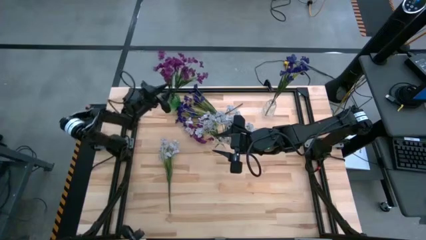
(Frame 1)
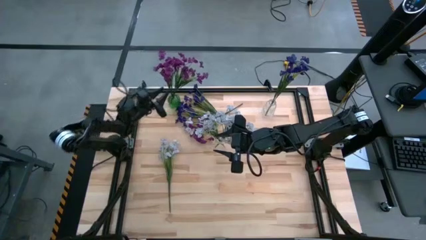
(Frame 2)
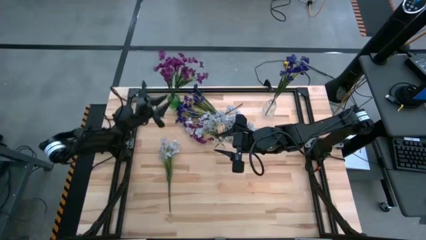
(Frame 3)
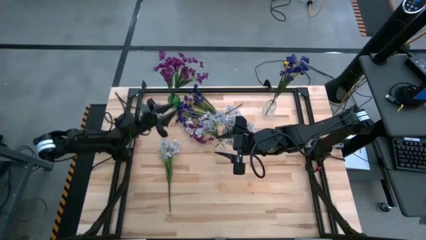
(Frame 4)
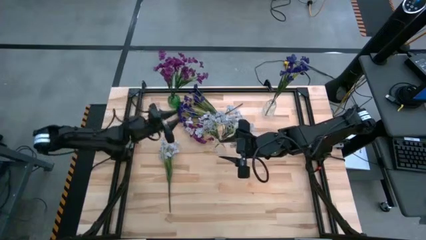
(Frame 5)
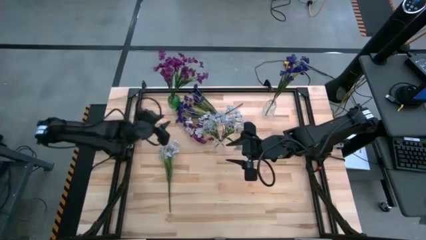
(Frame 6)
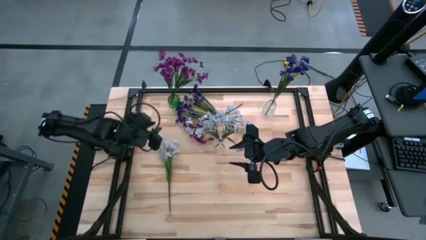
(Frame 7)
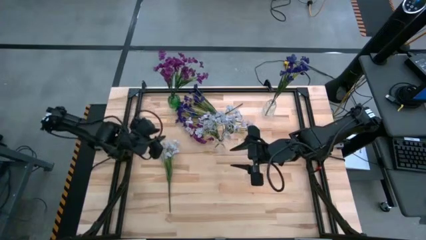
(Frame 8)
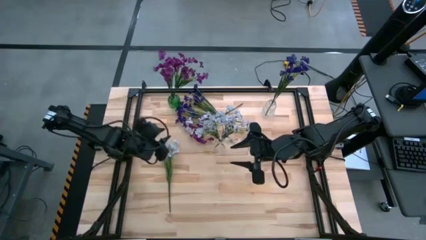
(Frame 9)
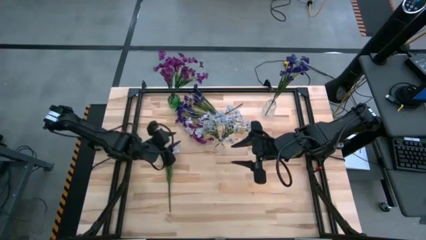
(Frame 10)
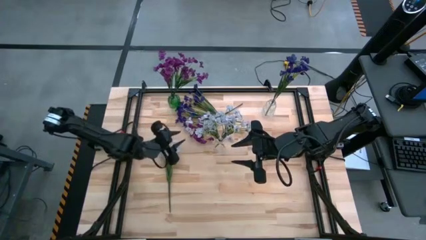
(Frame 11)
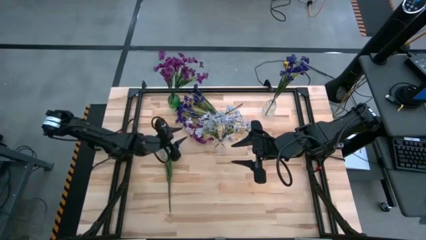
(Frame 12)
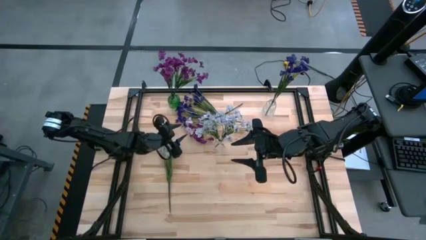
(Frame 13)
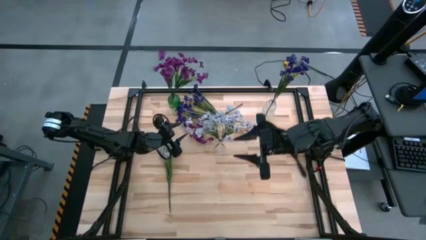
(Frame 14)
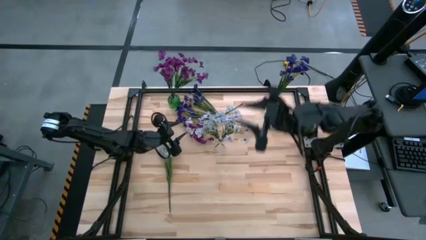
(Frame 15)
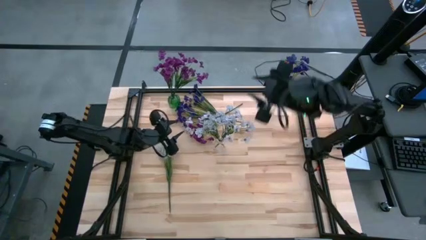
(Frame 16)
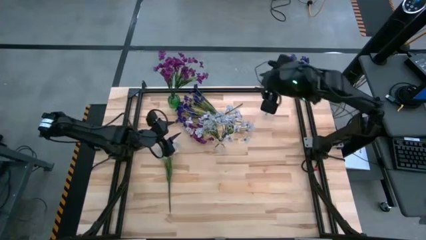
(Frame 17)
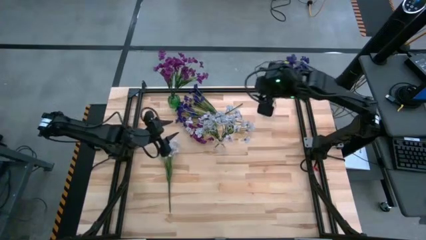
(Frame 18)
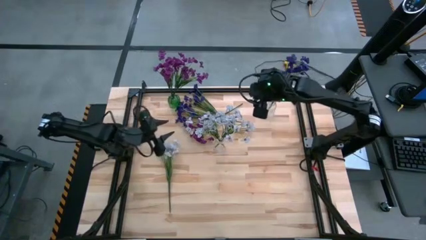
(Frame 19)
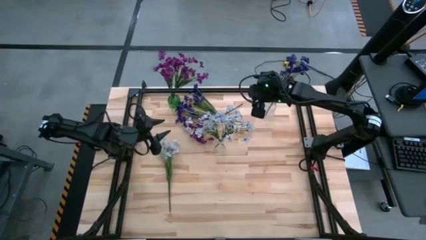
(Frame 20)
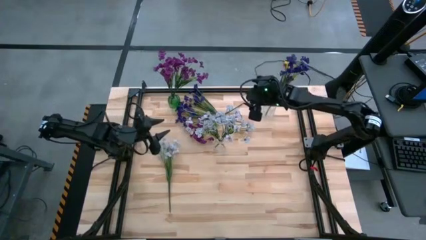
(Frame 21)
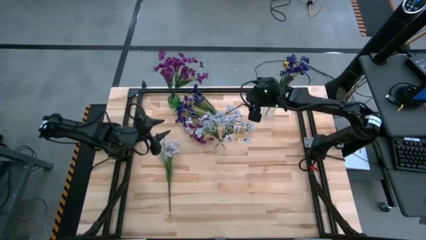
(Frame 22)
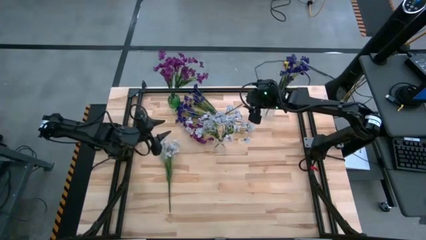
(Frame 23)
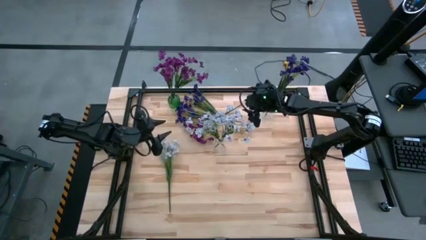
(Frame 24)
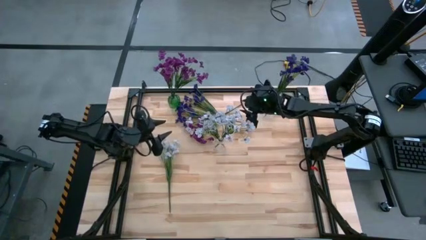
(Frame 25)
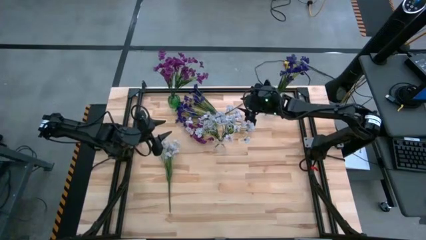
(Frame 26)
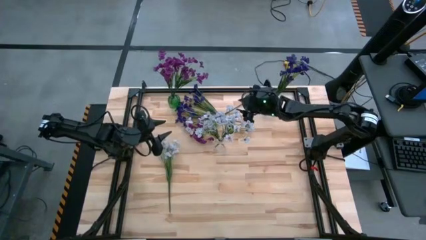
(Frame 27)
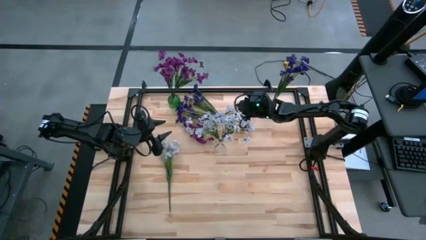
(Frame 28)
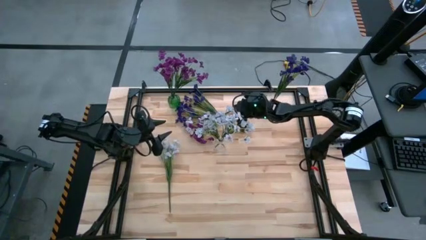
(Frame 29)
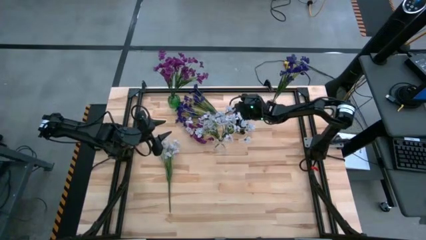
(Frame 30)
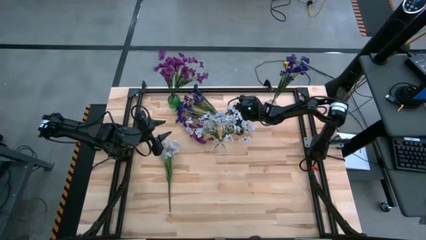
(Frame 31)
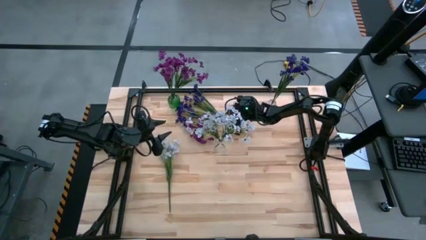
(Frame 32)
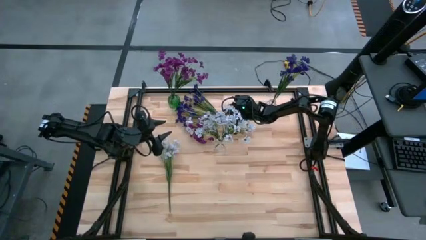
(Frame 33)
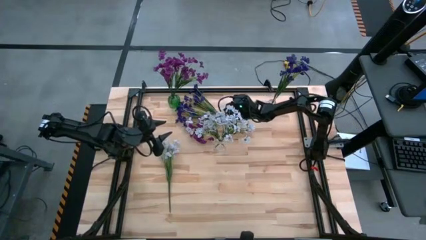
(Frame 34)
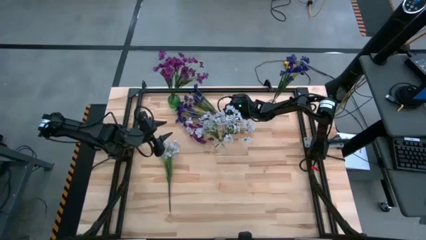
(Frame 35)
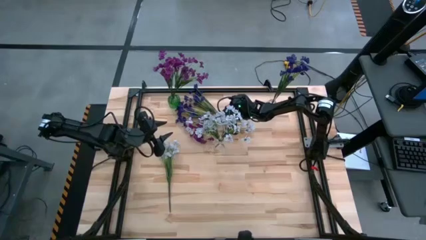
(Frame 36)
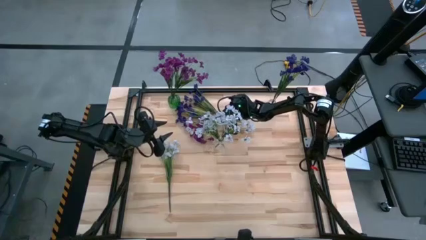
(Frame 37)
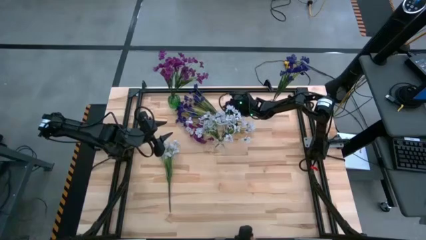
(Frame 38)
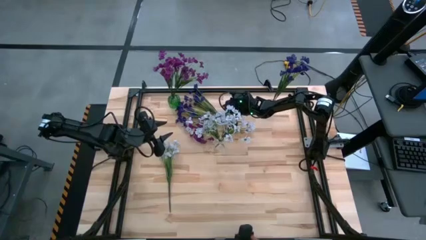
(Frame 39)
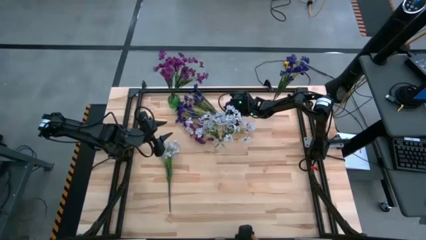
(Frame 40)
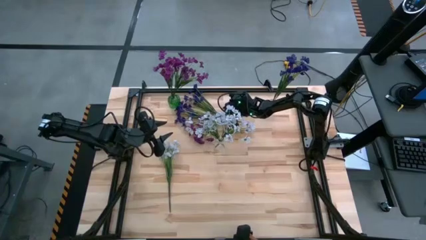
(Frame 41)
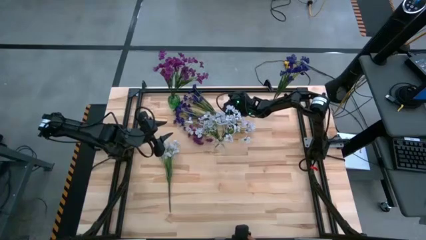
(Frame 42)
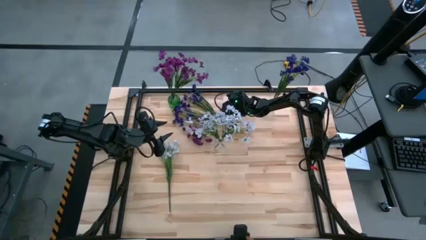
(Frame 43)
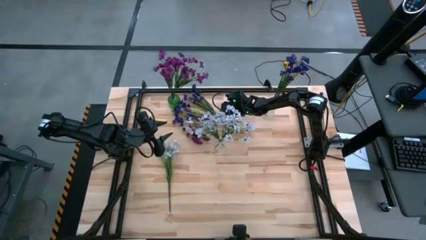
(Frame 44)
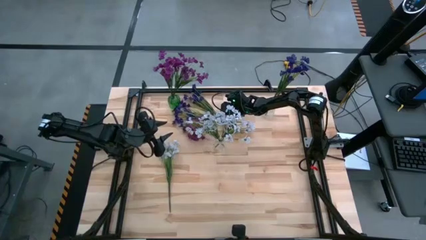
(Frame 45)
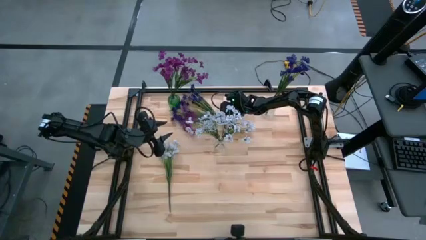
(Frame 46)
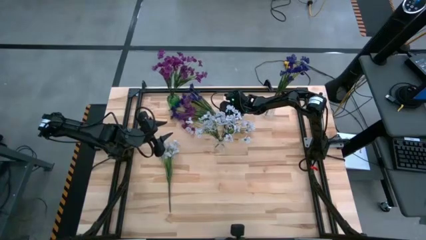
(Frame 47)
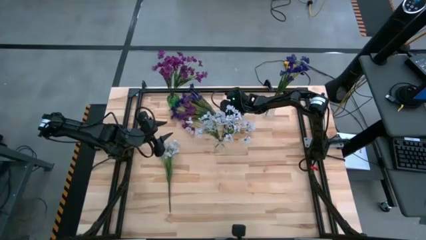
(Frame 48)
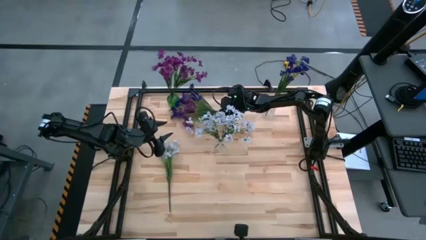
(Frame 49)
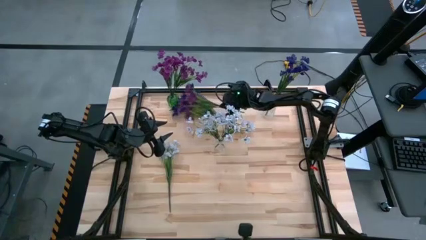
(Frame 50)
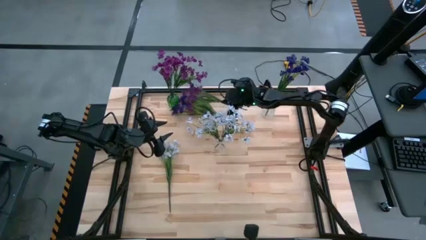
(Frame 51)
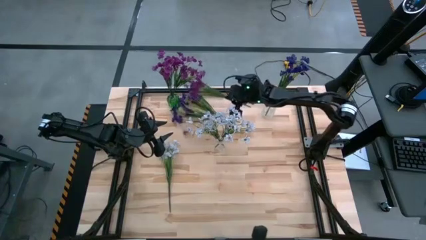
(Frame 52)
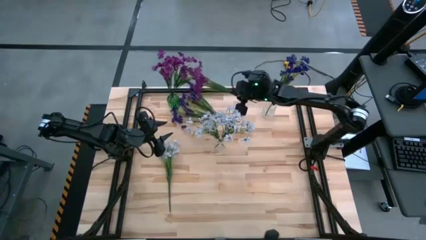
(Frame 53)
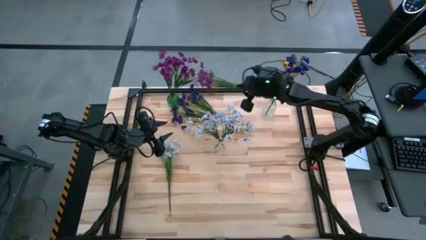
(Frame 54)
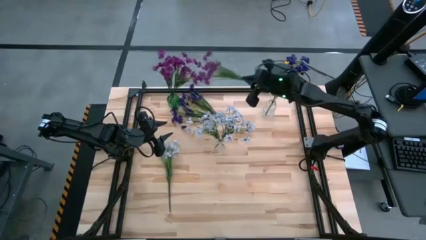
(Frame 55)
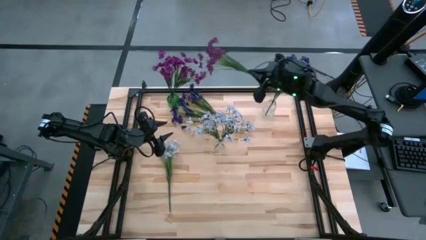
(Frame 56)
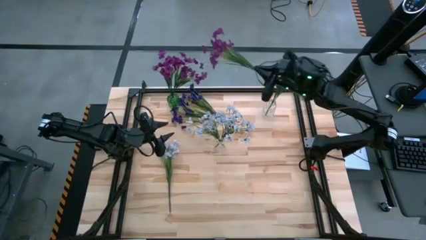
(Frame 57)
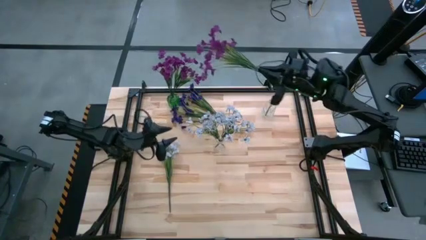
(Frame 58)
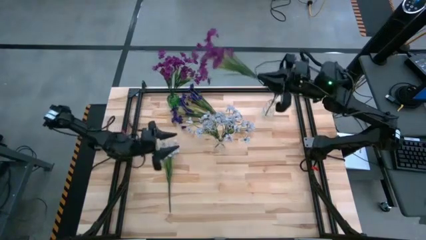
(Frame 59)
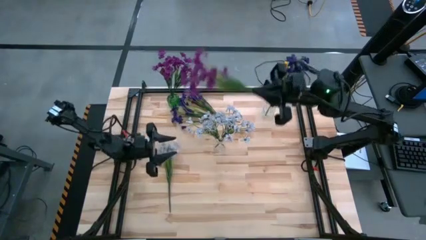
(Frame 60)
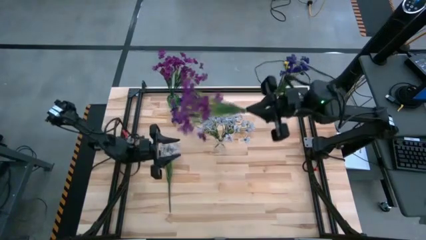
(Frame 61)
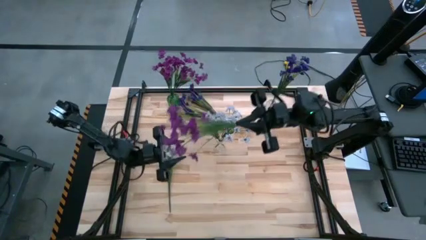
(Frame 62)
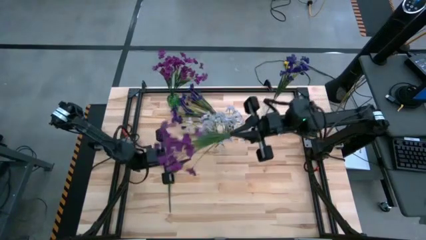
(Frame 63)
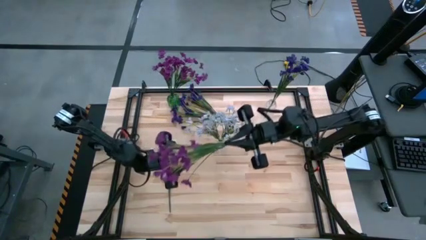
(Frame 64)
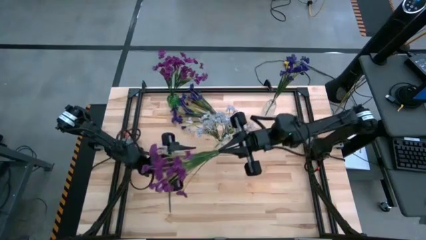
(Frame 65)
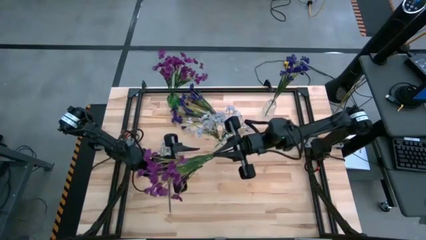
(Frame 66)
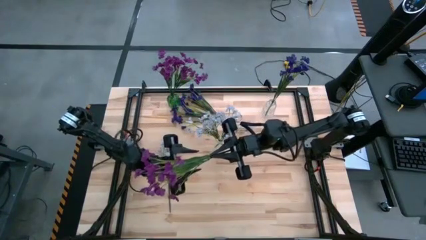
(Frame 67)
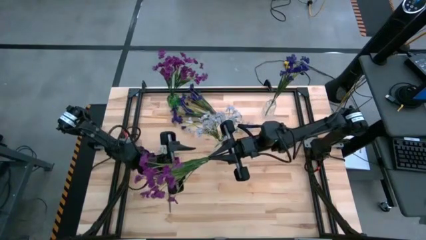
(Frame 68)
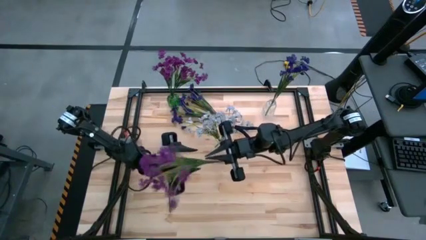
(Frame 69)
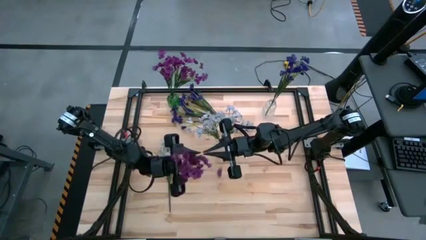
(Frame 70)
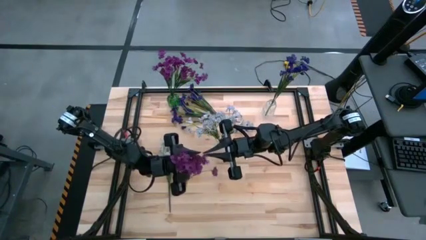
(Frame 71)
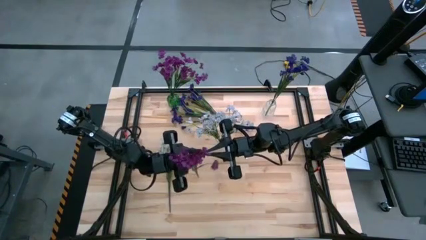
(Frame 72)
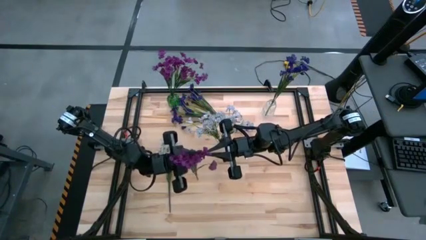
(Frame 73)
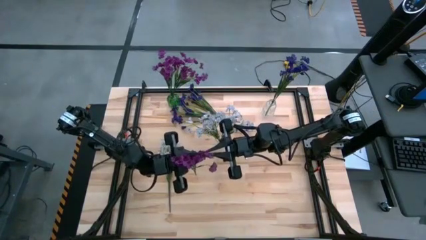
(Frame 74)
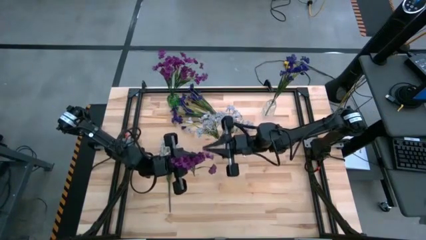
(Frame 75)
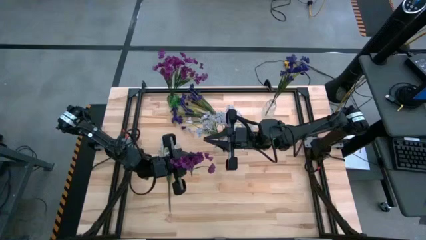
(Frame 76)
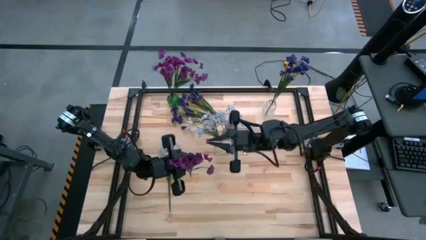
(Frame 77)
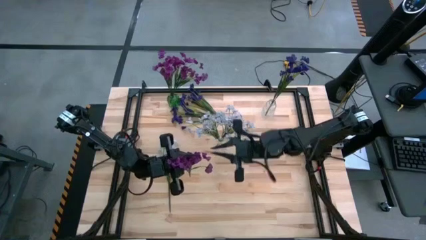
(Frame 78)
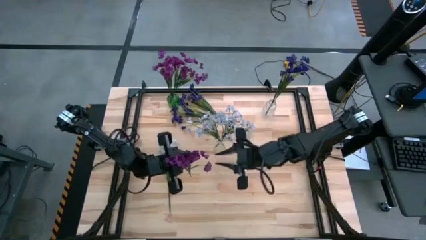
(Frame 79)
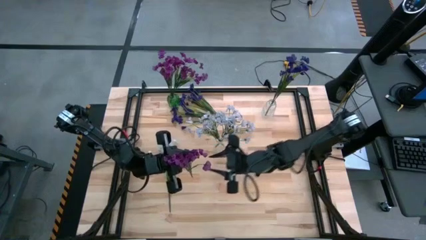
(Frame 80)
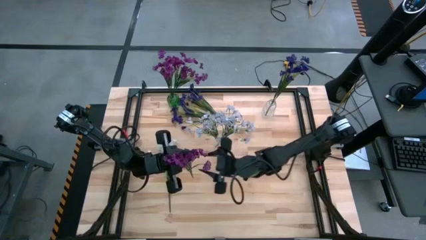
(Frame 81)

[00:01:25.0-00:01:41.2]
Task: Sort flowers into vase by color
Put the violet flowers into the green flower vase
